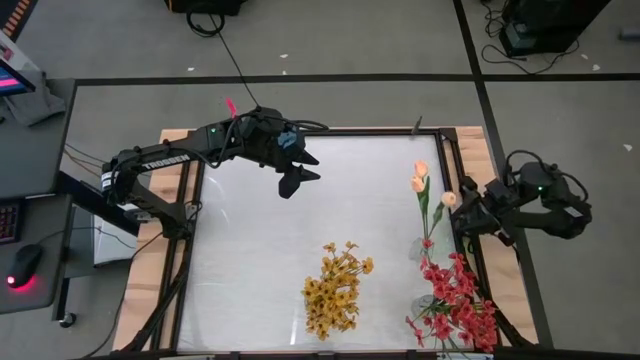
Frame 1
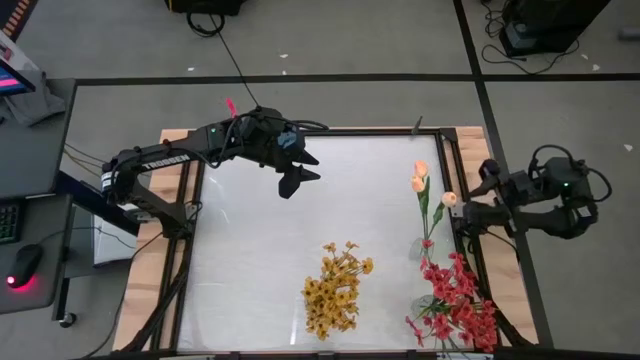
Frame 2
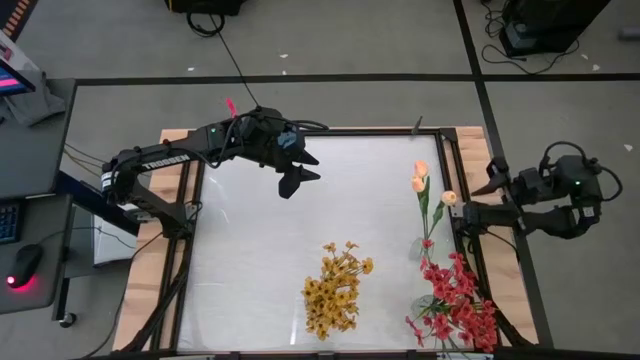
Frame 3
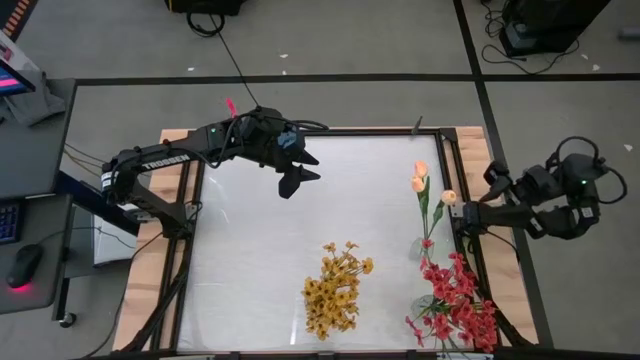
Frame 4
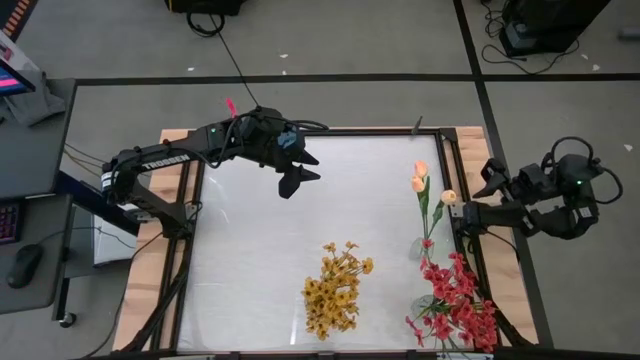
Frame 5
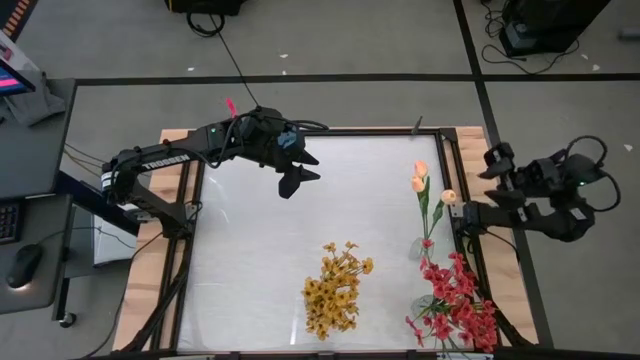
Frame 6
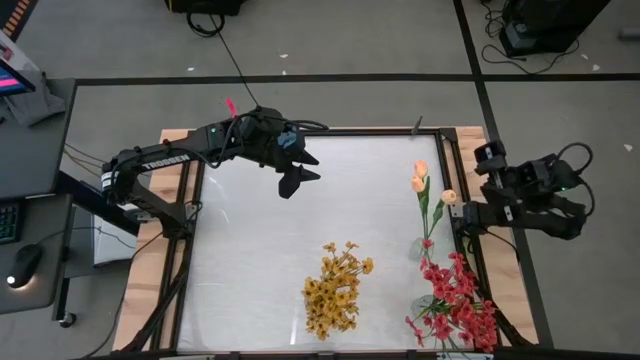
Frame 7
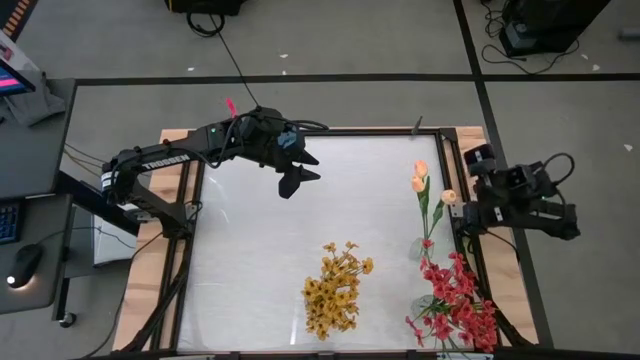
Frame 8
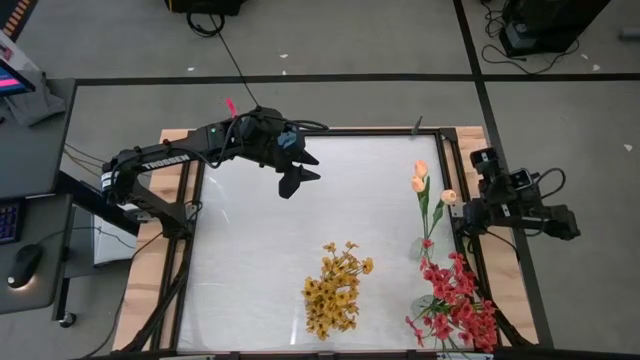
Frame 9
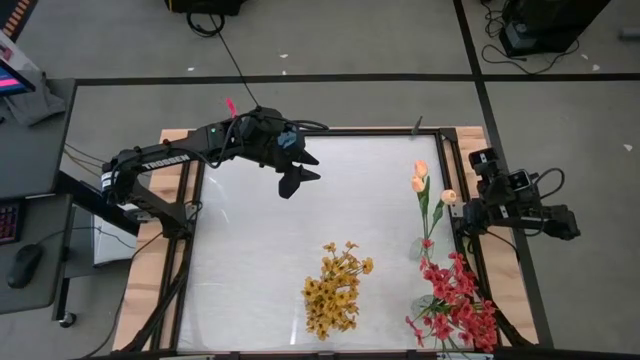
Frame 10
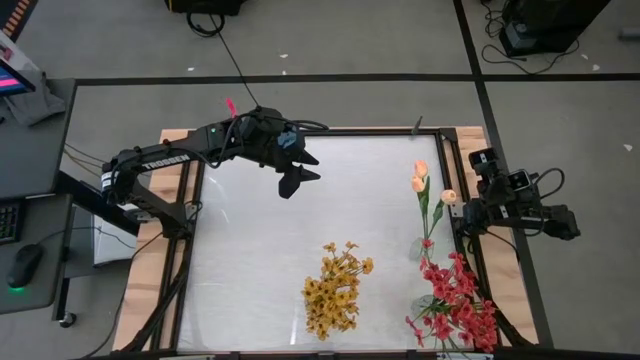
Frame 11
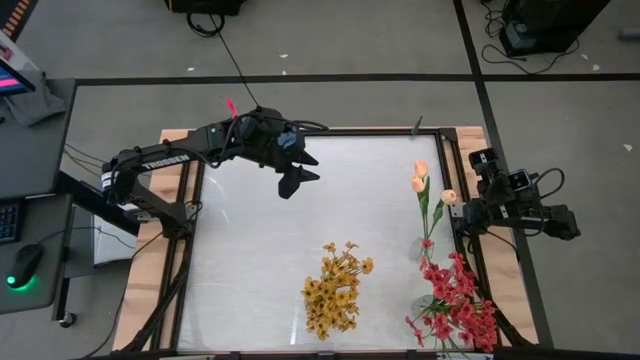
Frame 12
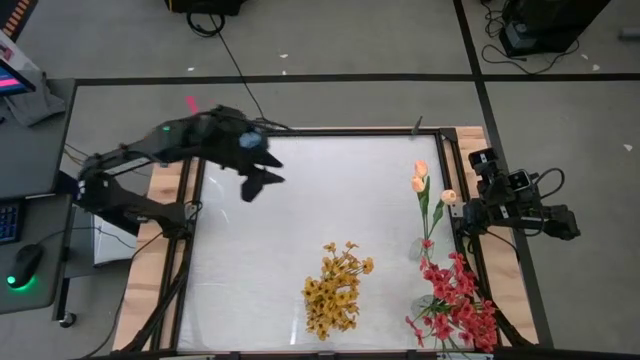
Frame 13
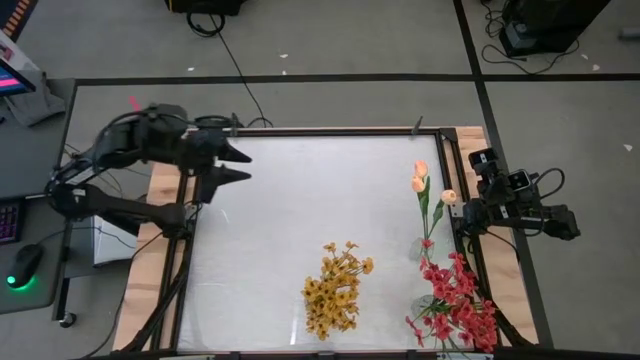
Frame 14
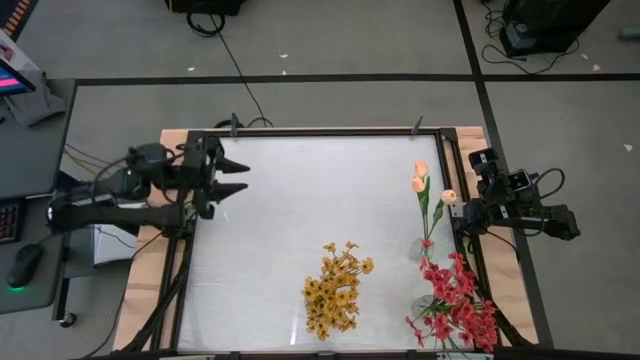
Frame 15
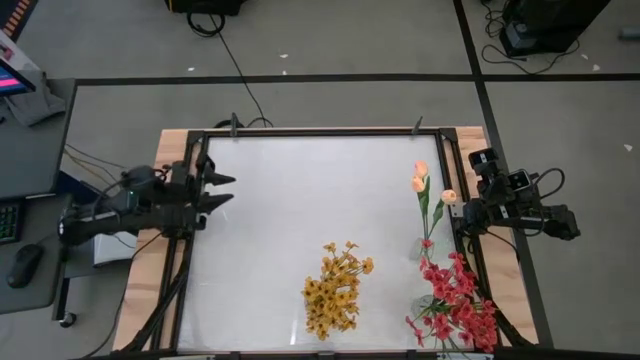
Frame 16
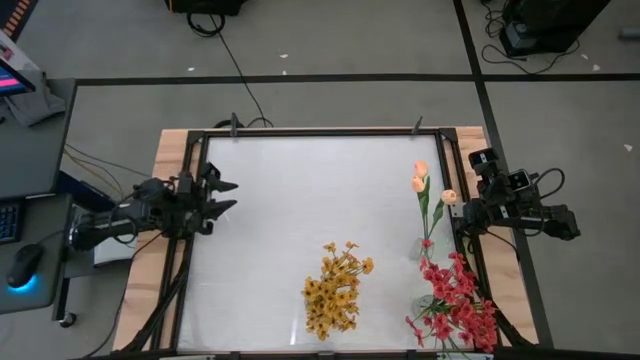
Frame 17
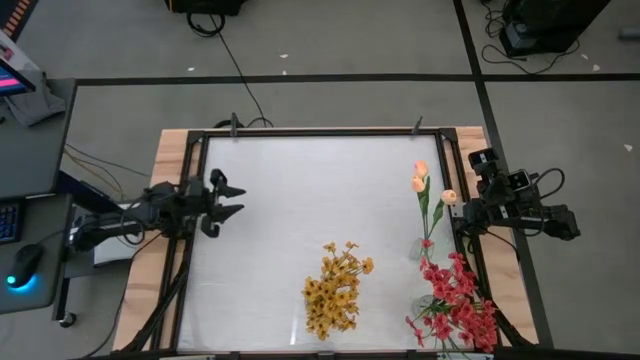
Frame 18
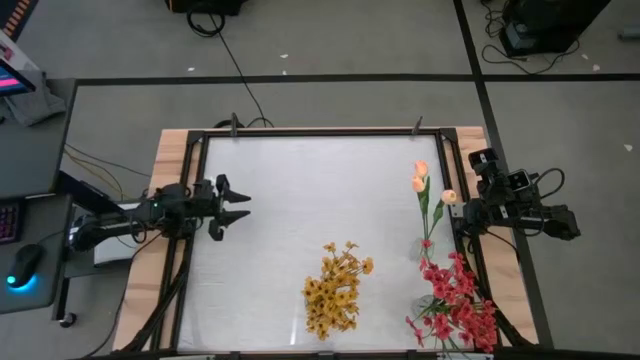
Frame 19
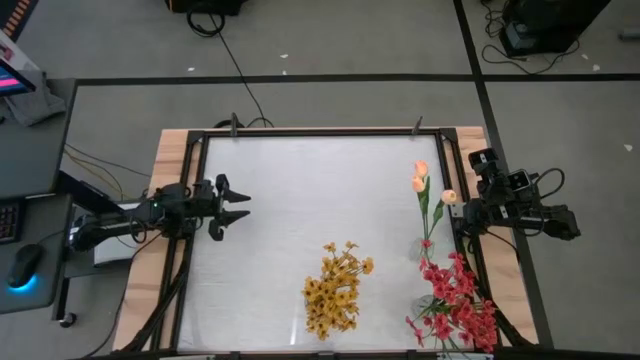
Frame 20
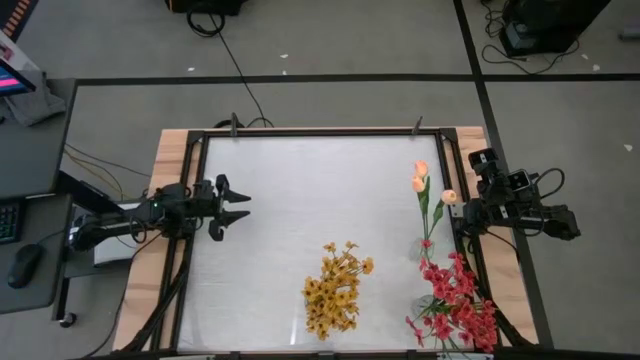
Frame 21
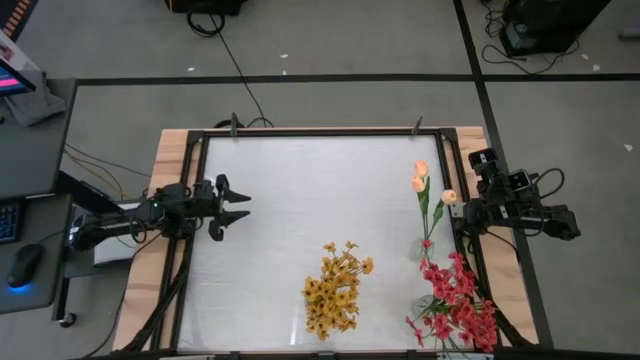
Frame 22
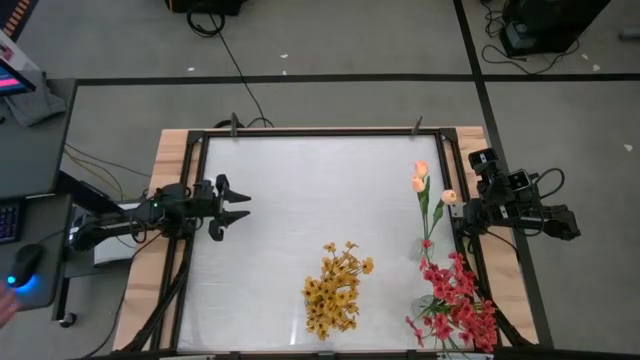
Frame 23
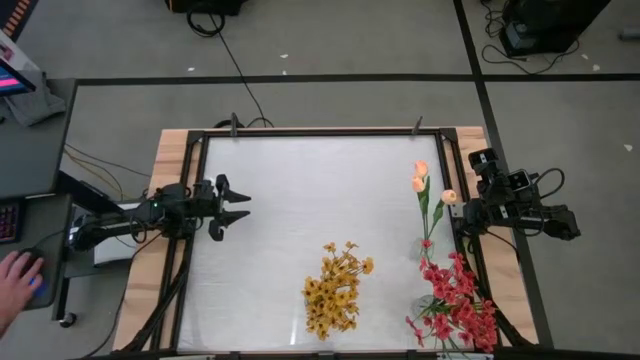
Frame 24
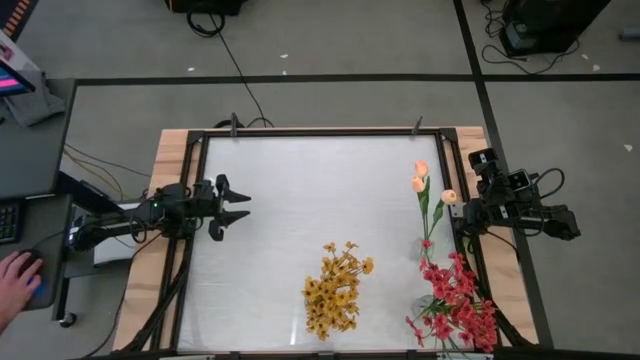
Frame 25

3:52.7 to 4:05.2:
Task: Sort flowers into vase by color
Return to Home Position

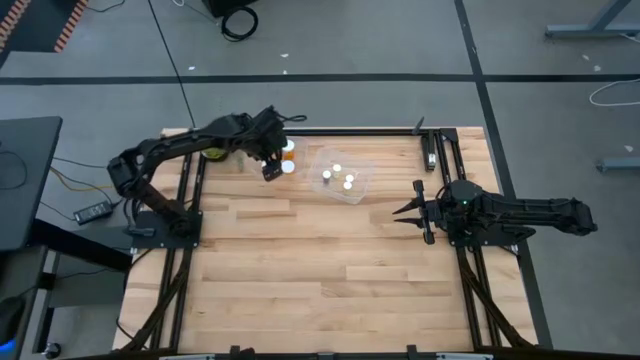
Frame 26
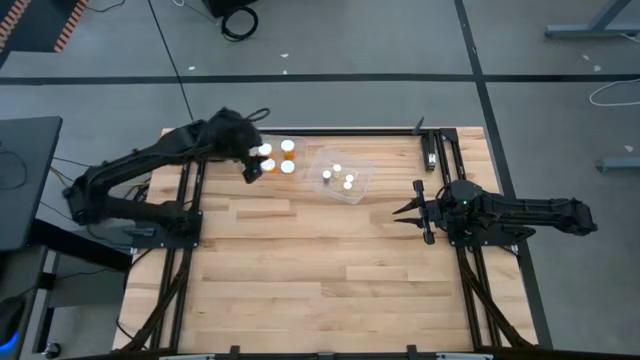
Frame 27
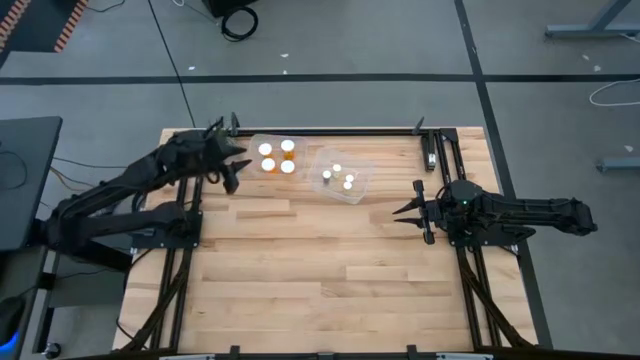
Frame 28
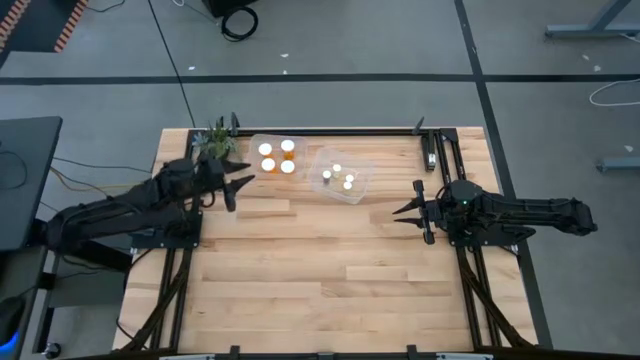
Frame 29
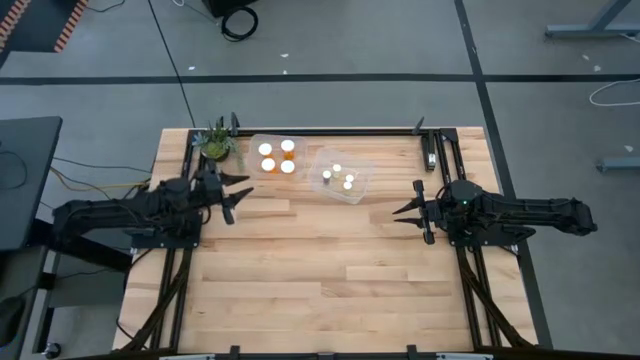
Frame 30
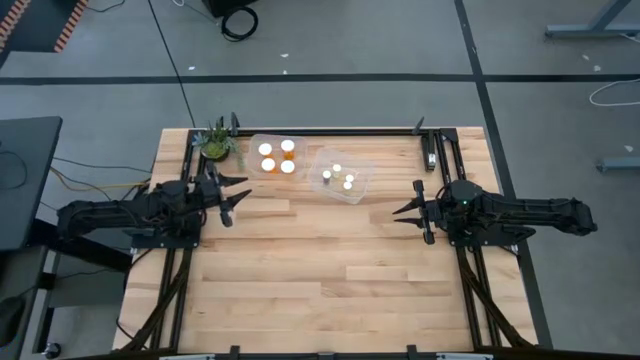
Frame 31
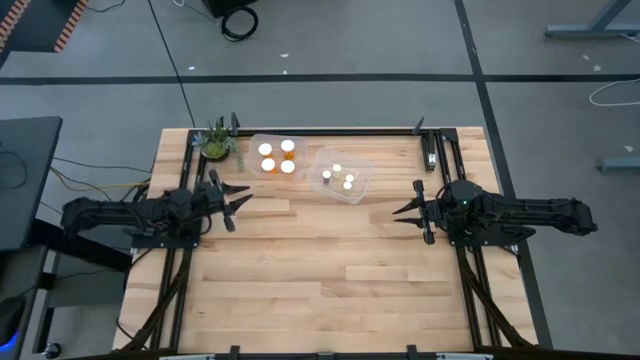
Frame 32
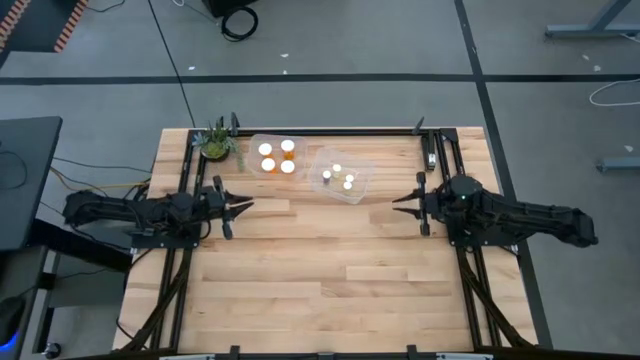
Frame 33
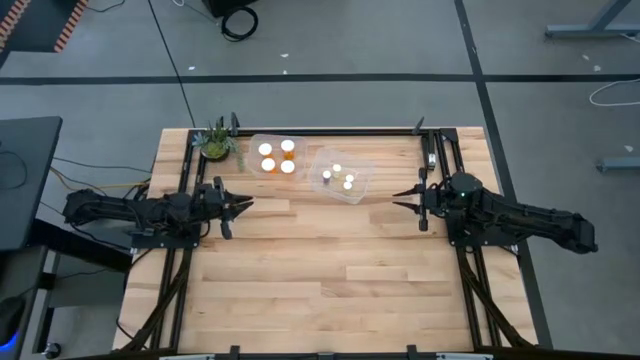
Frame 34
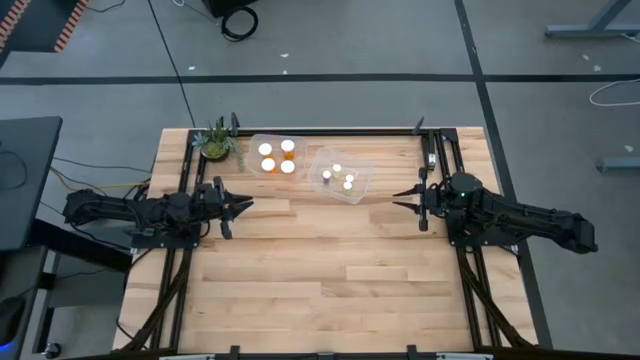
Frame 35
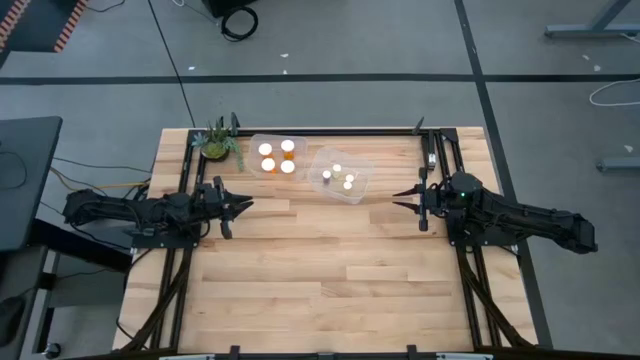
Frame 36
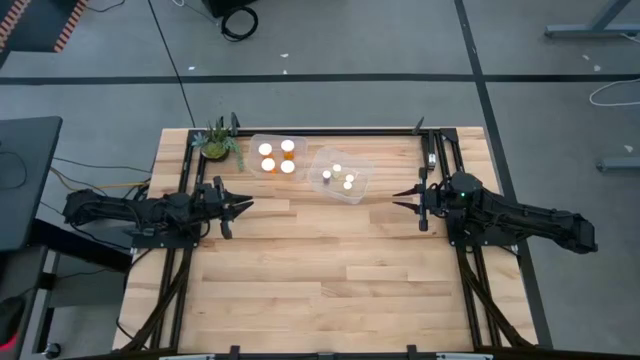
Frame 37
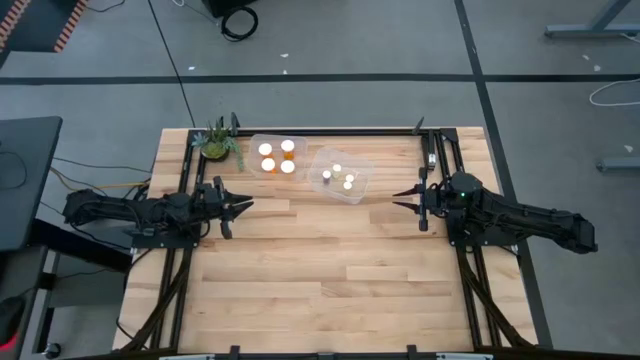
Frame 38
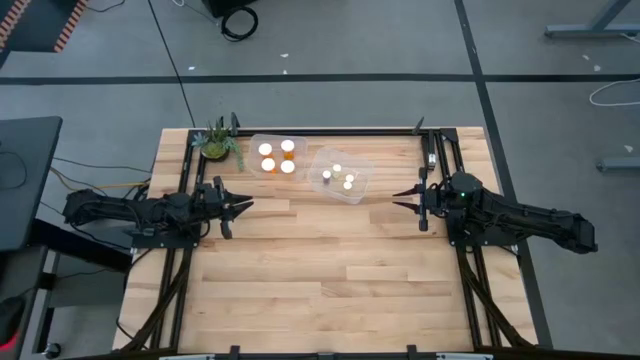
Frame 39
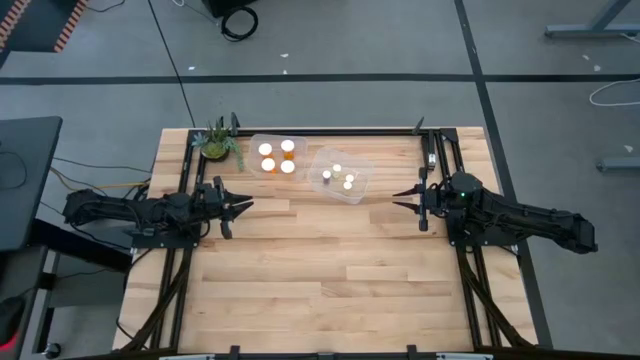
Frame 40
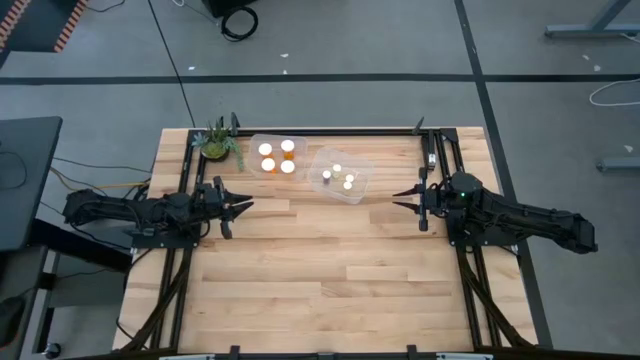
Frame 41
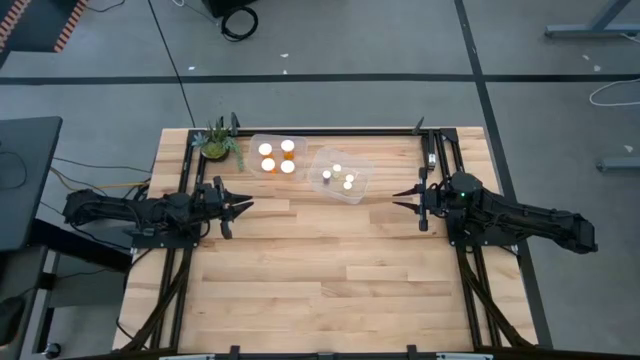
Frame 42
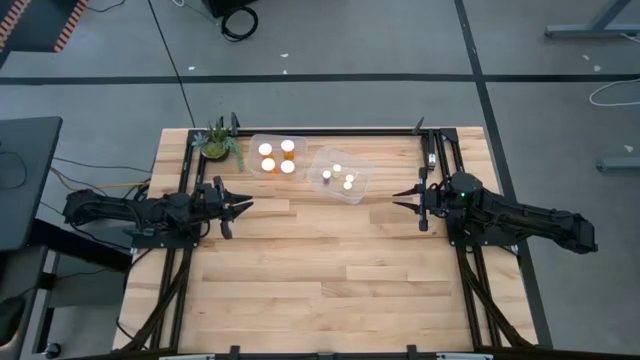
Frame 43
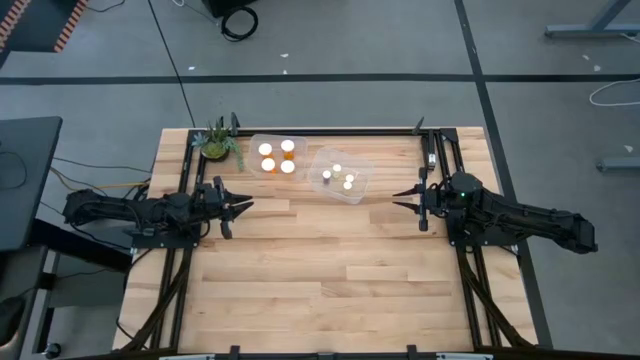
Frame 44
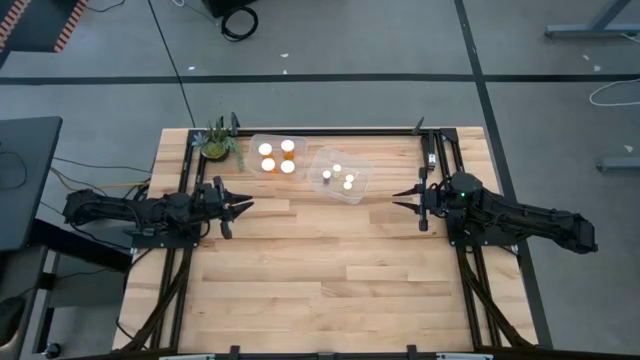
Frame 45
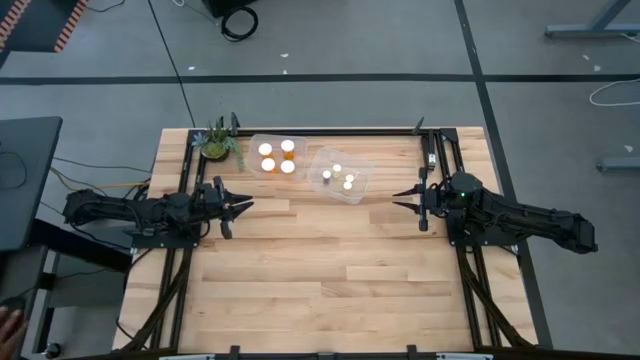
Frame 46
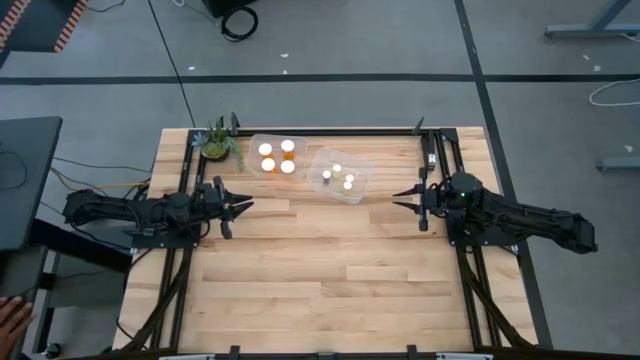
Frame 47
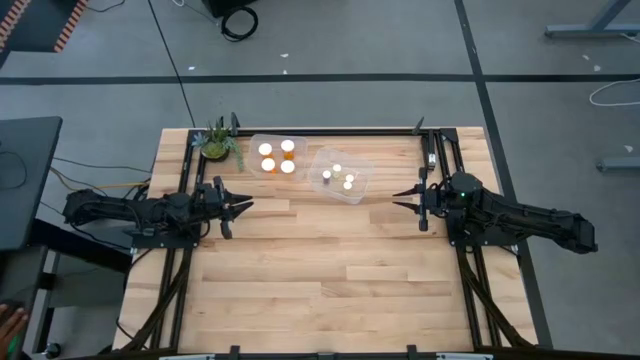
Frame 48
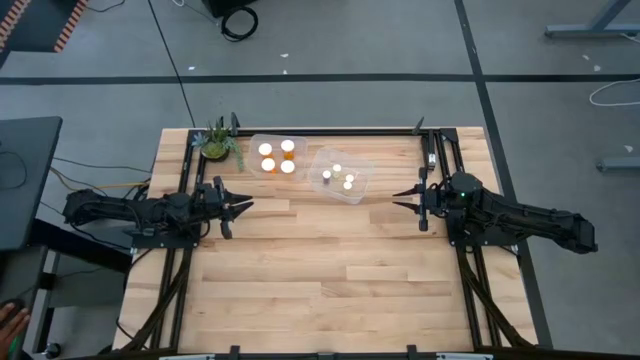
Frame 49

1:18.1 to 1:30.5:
Task: Pick and place medicine bottles into bin by pill shape (circle, oval)
Return to Home Position
